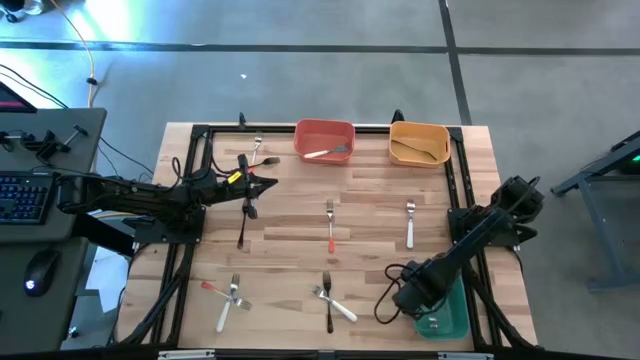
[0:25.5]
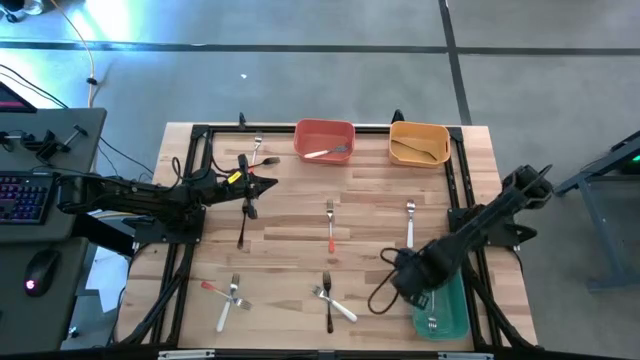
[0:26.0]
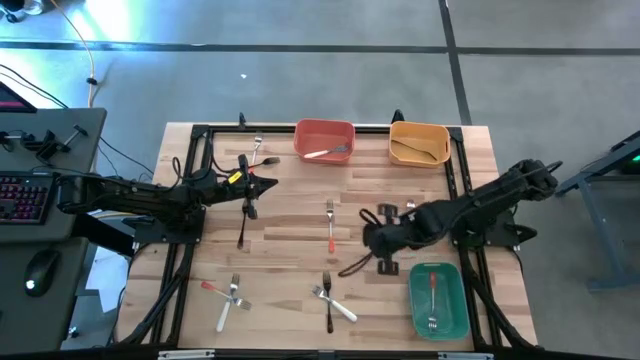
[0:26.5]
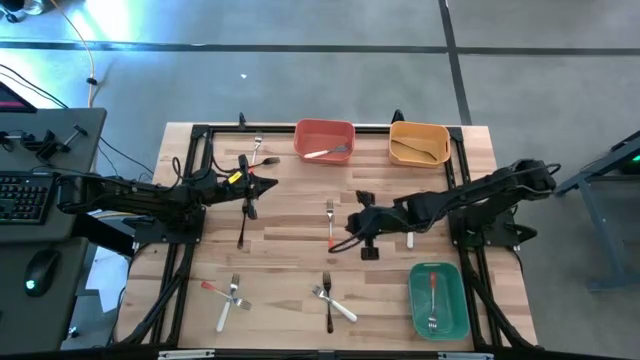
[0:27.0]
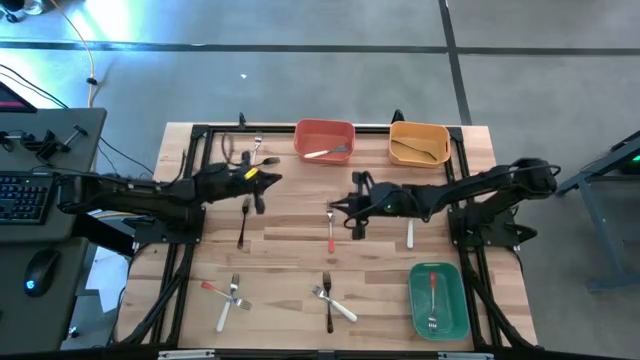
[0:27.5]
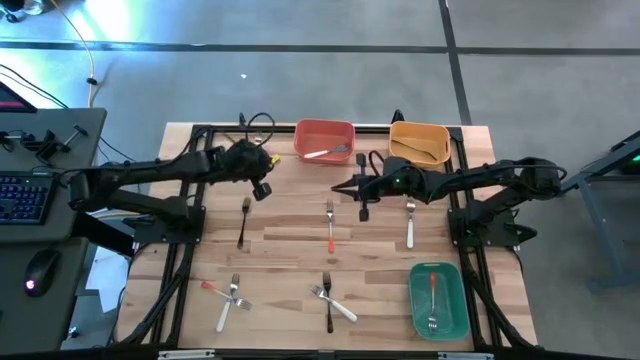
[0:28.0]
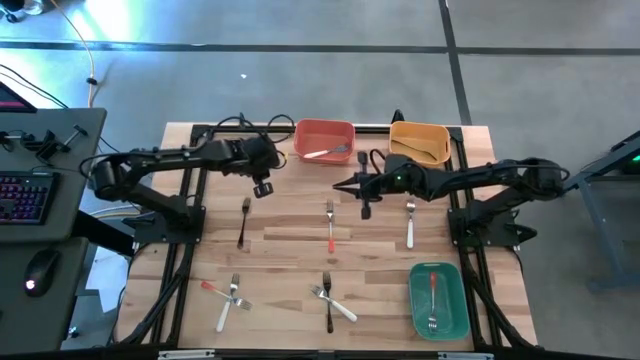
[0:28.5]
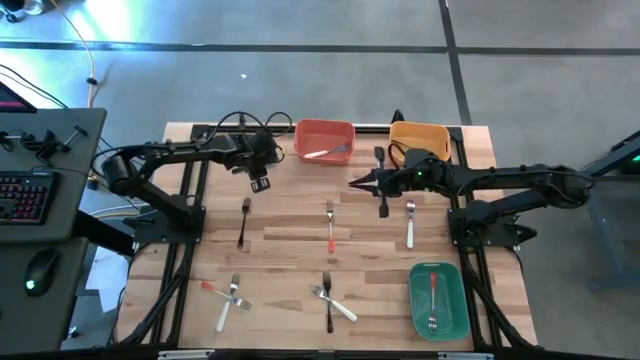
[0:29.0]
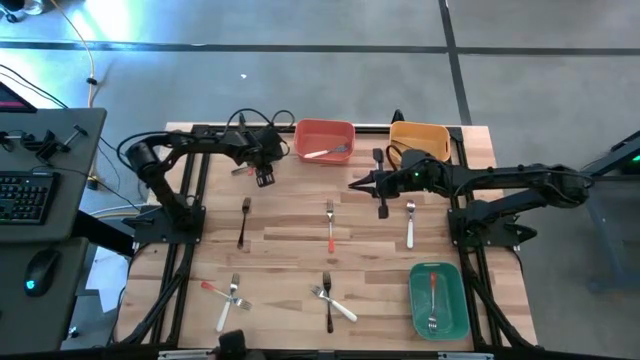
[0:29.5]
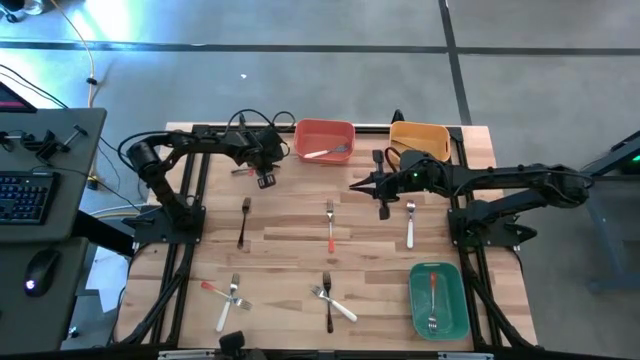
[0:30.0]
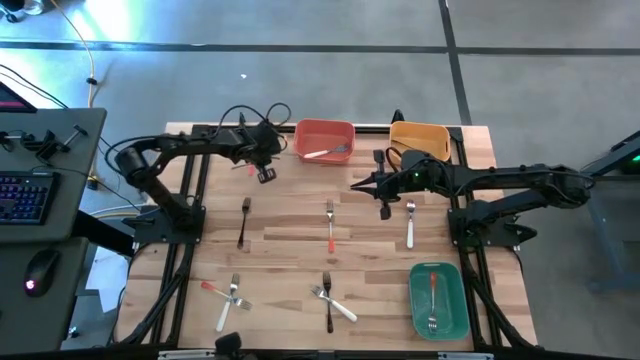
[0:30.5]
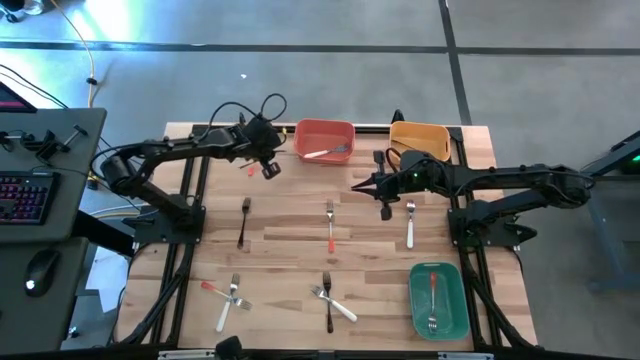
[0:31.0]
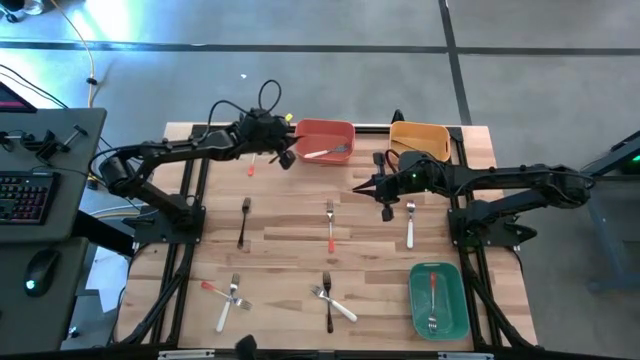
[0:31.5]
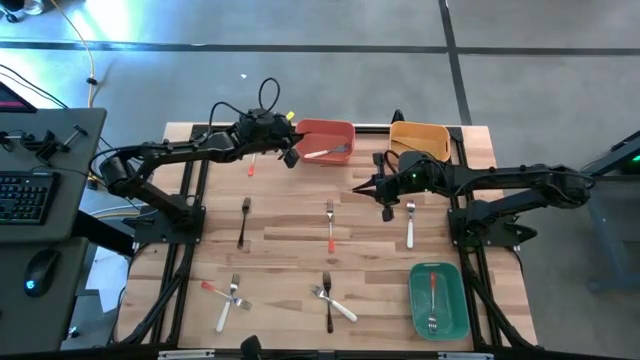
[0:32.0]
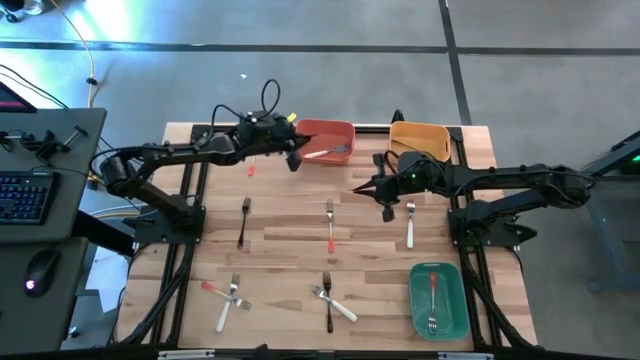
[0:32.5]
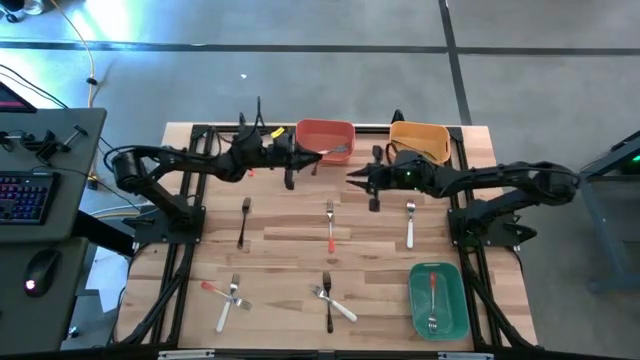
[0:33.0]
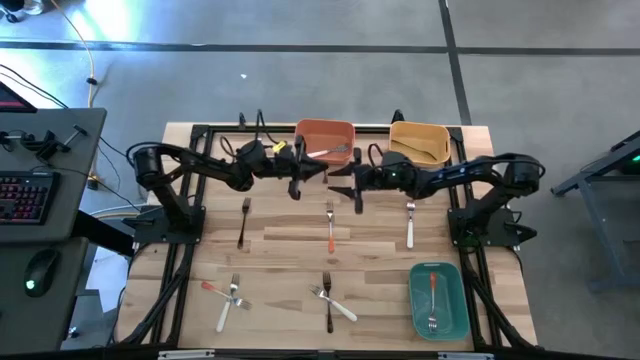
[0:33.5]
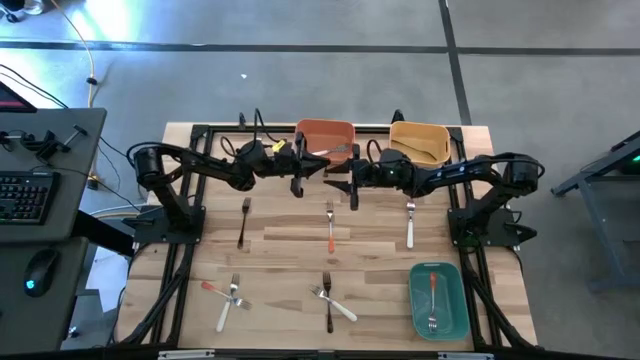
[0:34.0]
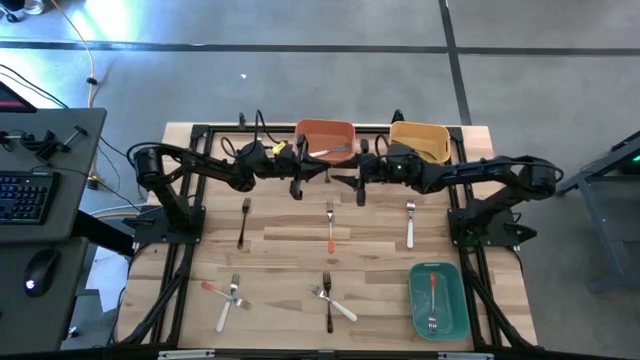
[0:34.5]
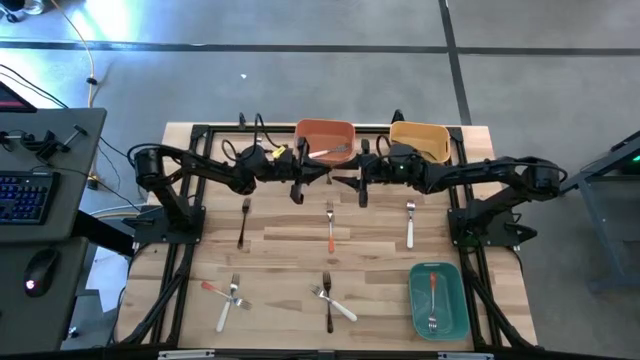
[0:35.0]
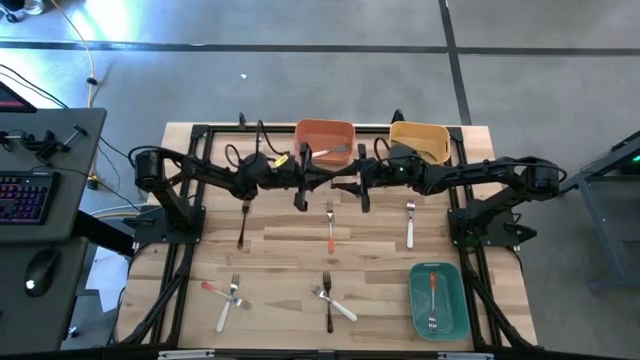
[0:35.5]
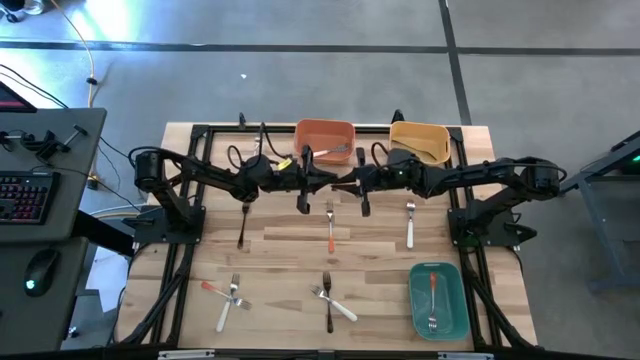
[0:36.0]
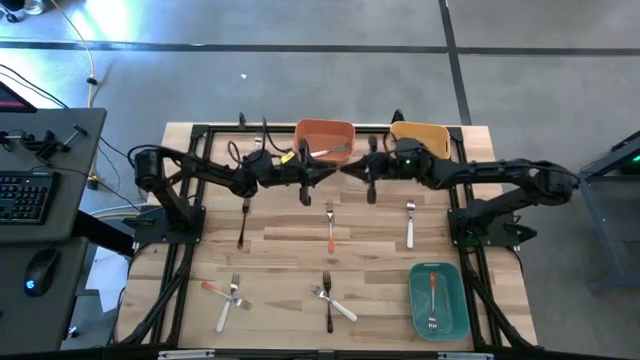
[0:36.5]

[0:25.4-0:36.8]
Task: Sort silverware by color (type)
Put the black fork into the yellow bin

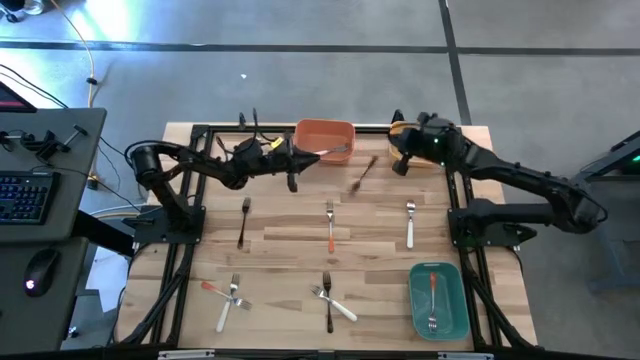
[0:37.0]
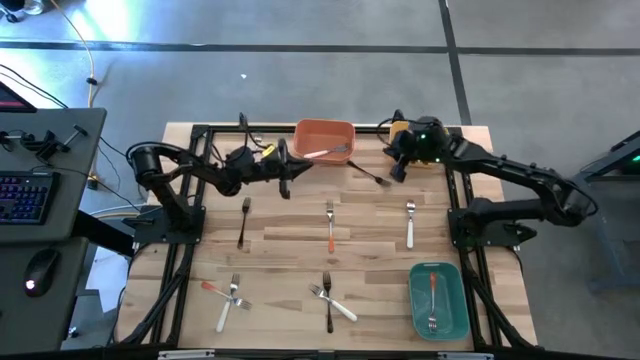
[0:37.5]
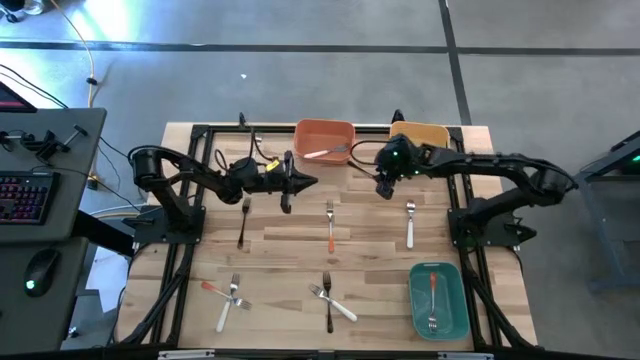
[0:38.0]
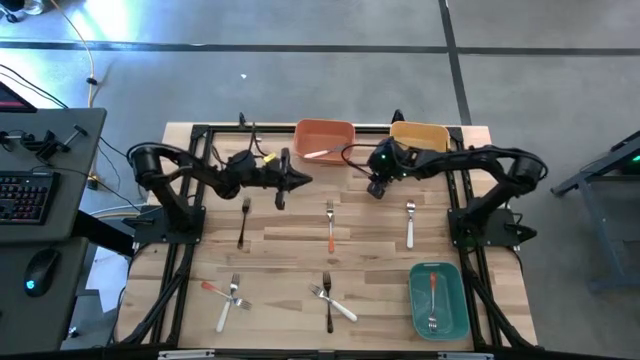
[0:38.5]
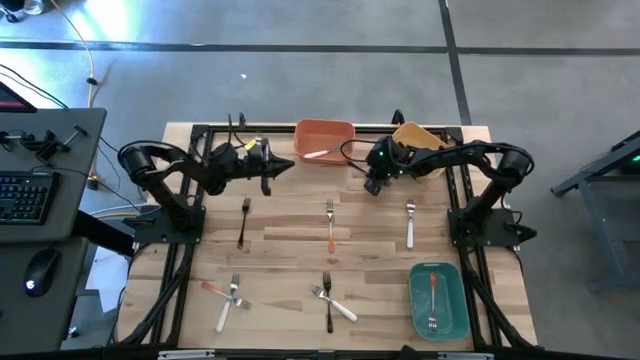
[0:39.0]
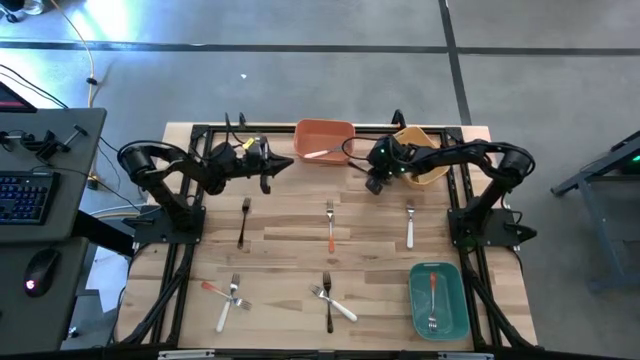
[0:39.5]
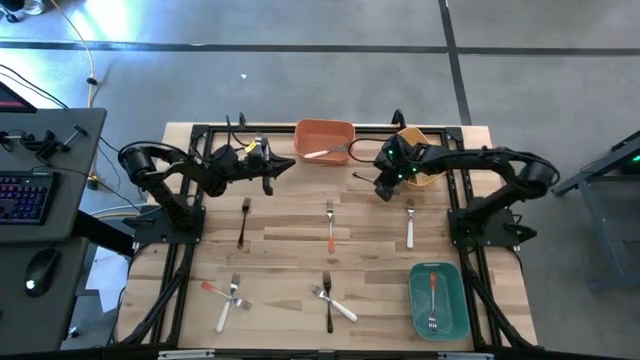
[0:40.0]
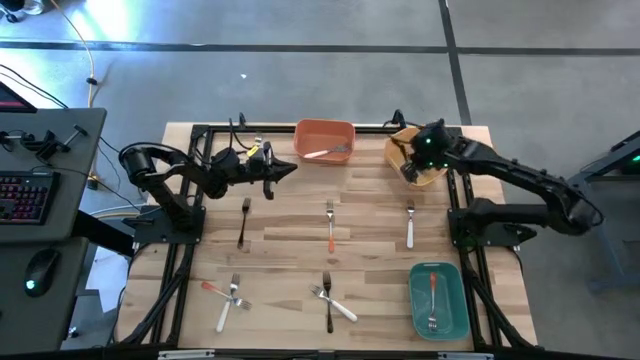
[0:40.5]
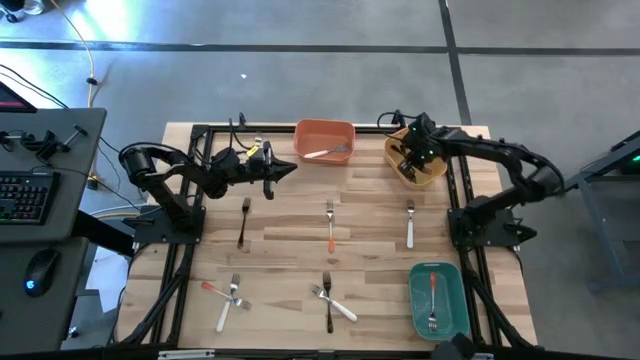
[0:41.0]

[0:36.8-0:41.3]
Put the black fork into the yellow bin

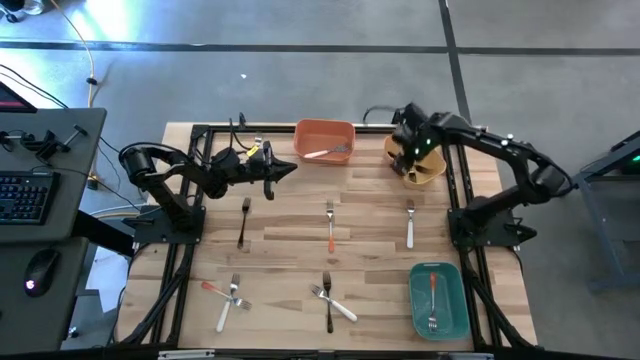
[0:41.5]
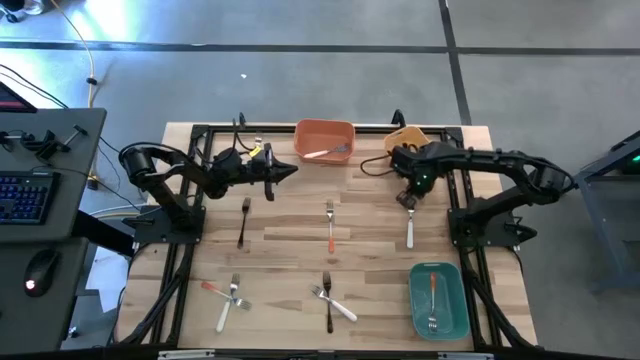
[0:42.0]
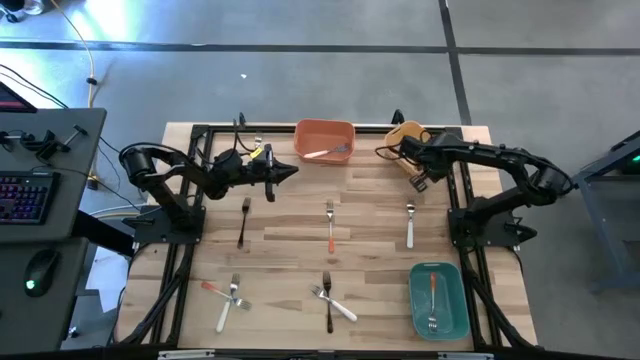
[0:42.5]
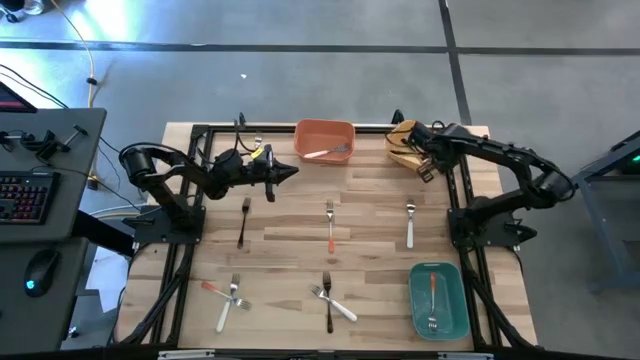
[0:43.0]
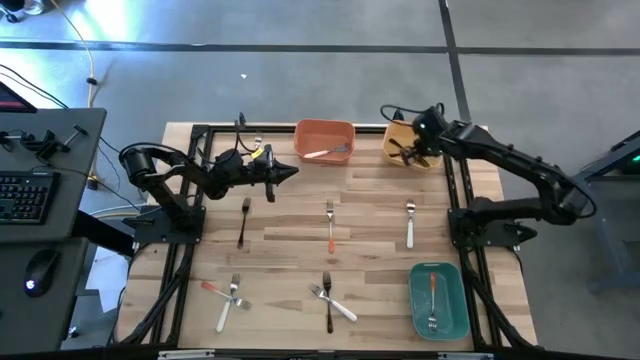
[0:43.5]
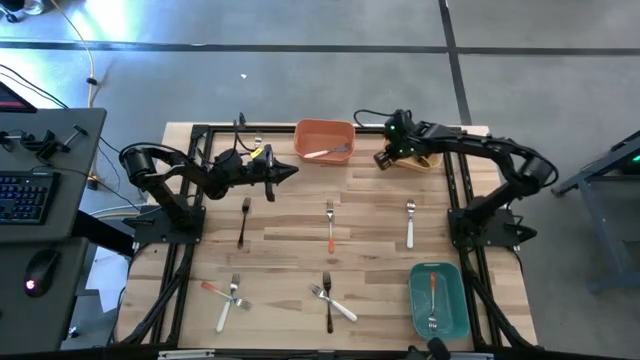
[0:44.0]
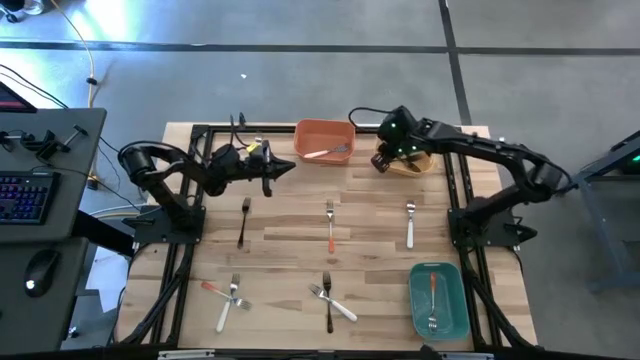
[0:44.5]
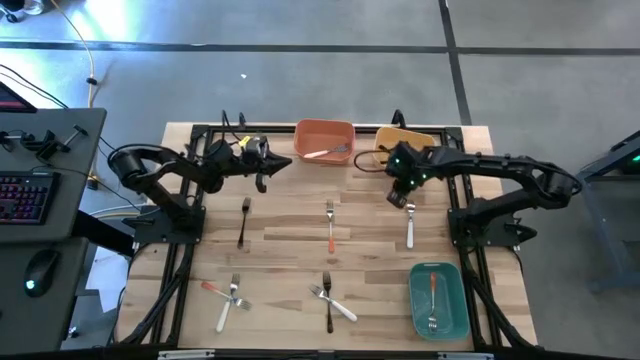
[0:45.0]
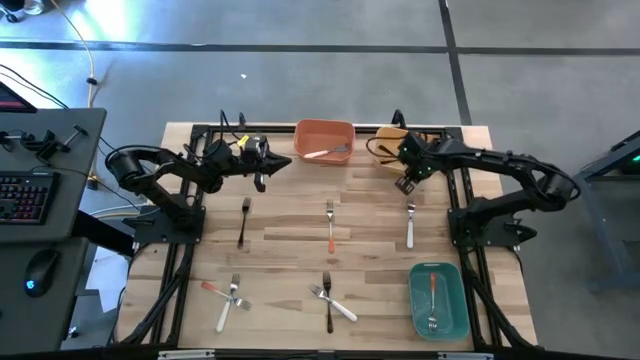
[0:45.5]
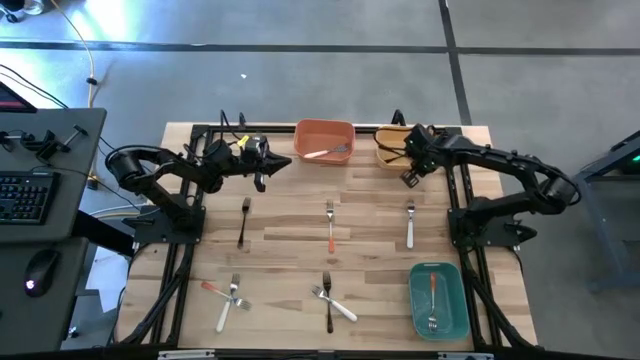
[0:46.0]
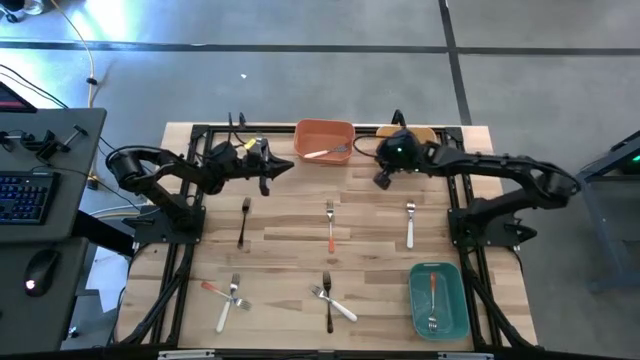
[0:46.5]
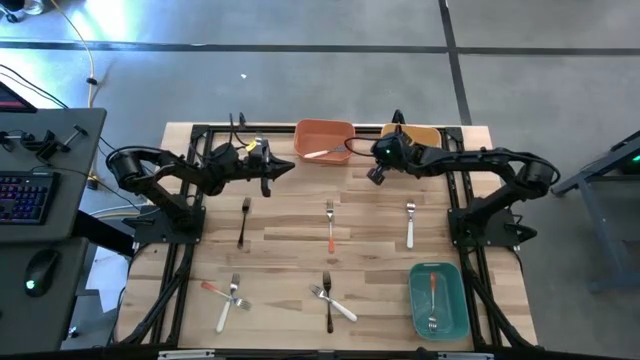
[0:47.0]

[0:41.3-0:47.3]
Adjust the yellow bin
